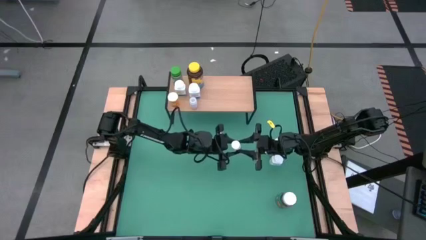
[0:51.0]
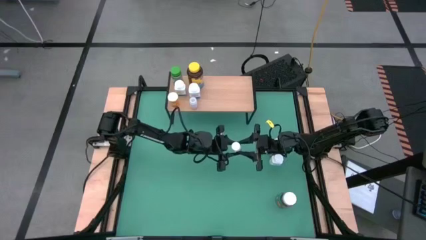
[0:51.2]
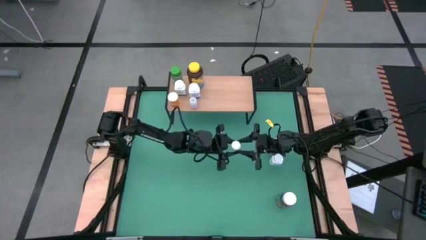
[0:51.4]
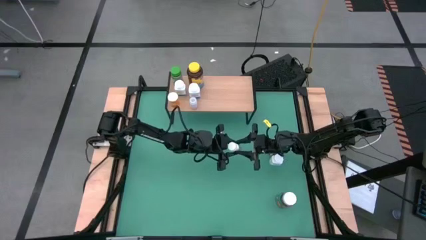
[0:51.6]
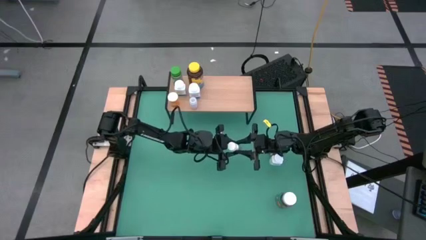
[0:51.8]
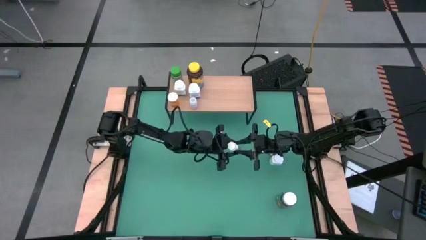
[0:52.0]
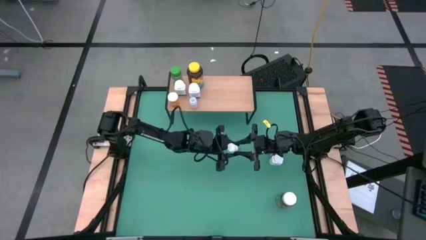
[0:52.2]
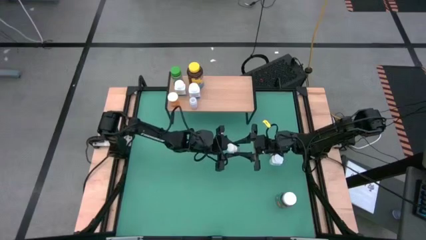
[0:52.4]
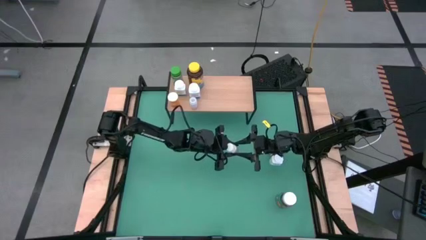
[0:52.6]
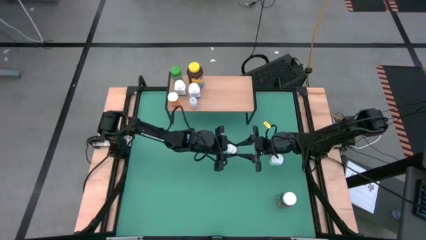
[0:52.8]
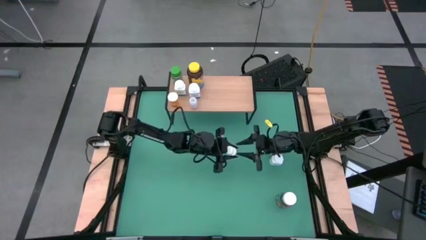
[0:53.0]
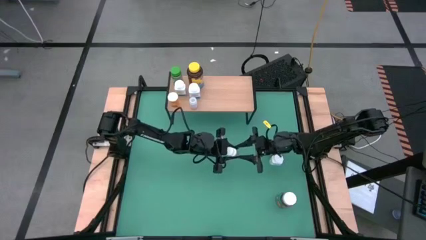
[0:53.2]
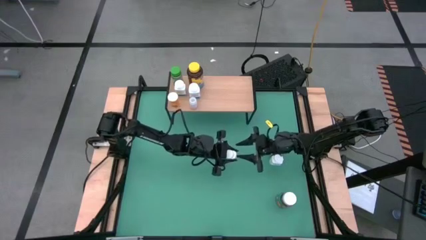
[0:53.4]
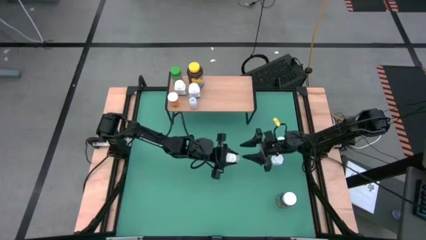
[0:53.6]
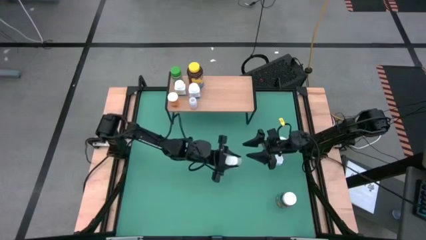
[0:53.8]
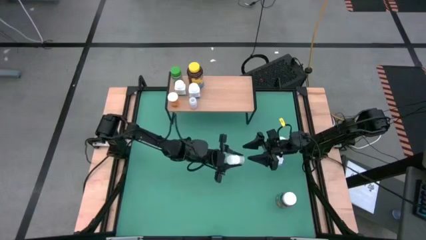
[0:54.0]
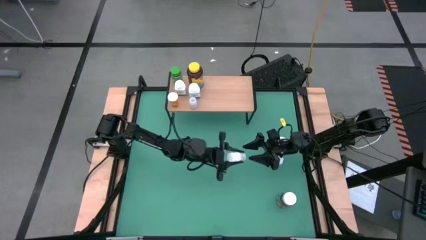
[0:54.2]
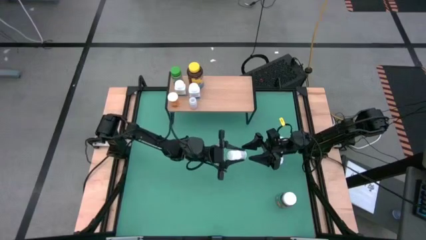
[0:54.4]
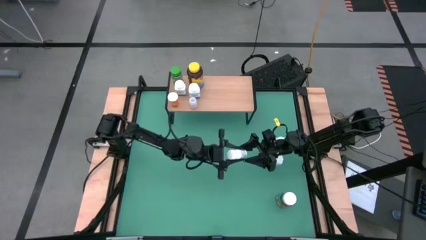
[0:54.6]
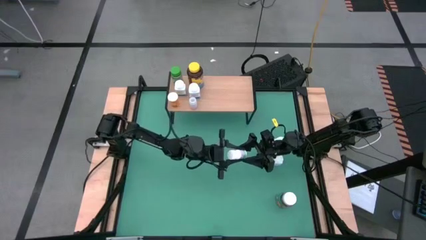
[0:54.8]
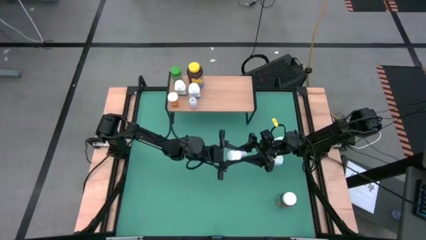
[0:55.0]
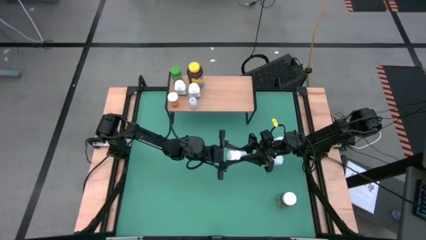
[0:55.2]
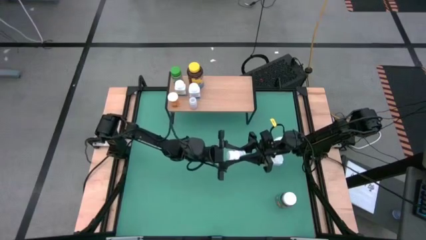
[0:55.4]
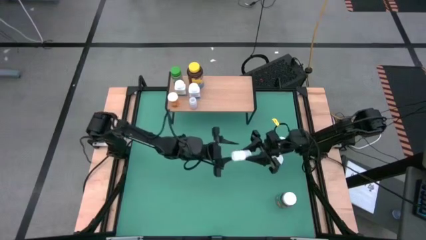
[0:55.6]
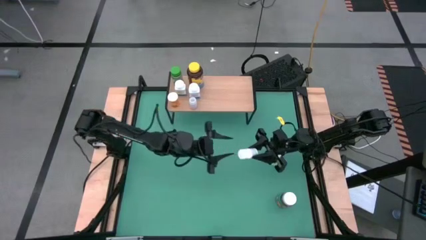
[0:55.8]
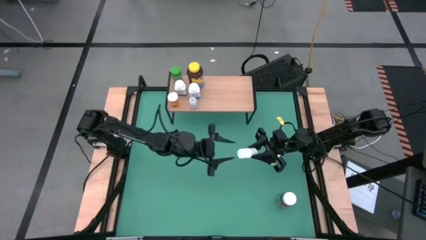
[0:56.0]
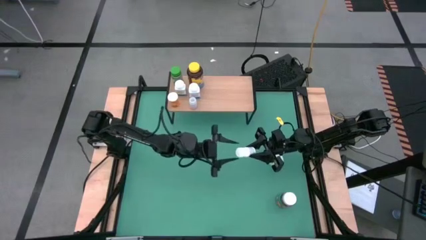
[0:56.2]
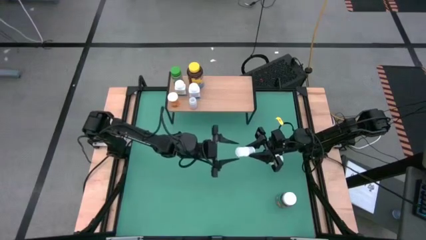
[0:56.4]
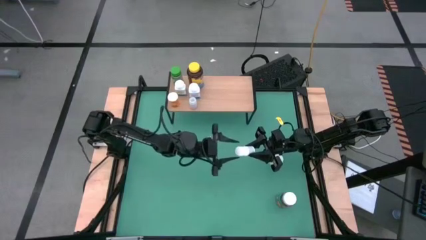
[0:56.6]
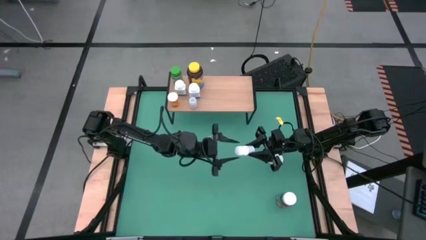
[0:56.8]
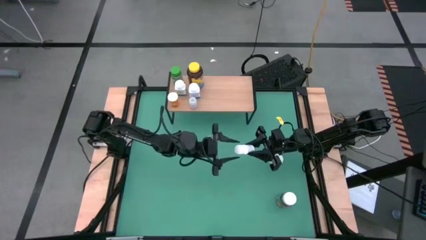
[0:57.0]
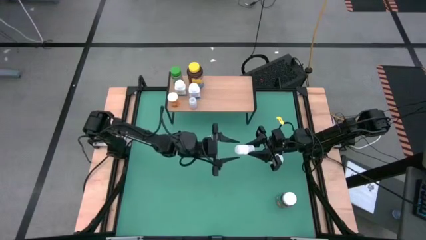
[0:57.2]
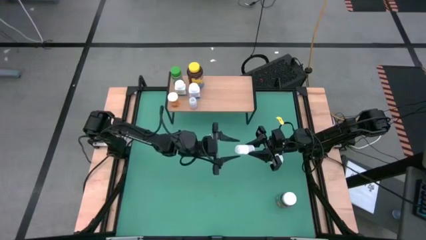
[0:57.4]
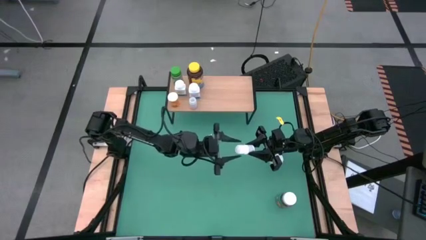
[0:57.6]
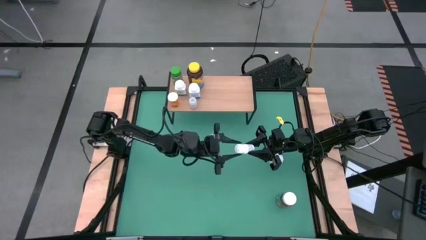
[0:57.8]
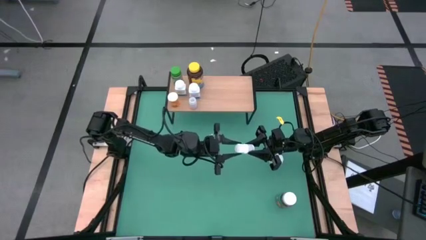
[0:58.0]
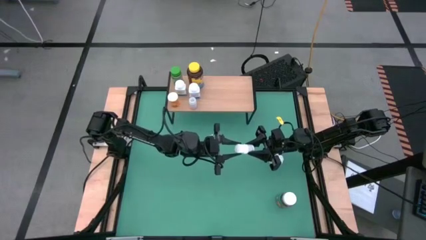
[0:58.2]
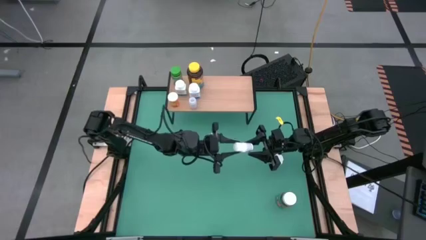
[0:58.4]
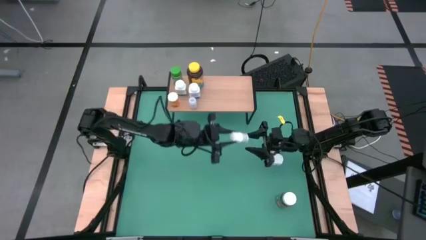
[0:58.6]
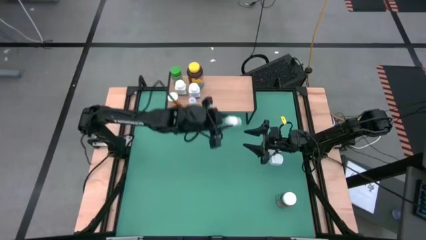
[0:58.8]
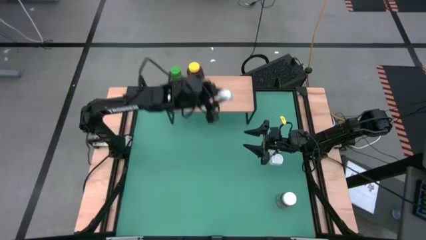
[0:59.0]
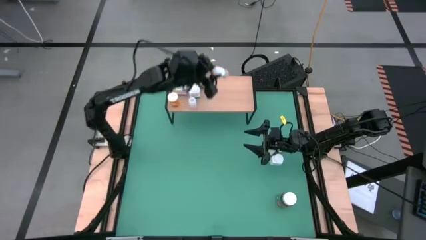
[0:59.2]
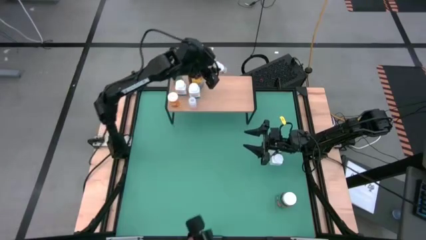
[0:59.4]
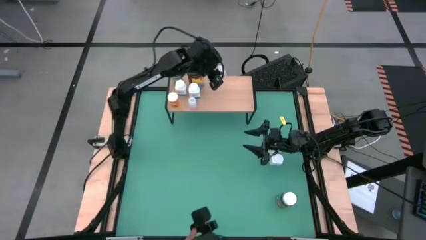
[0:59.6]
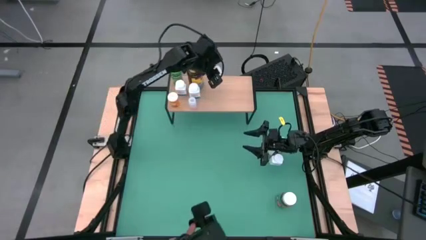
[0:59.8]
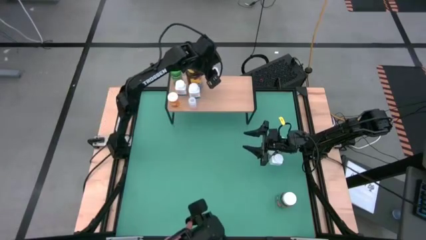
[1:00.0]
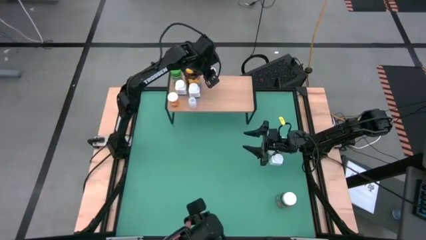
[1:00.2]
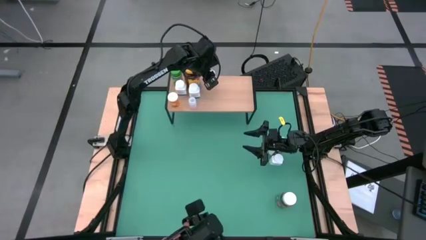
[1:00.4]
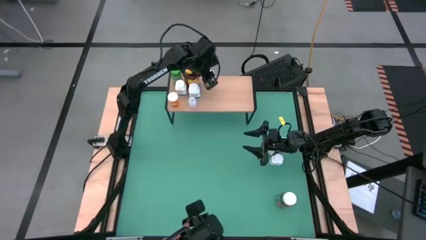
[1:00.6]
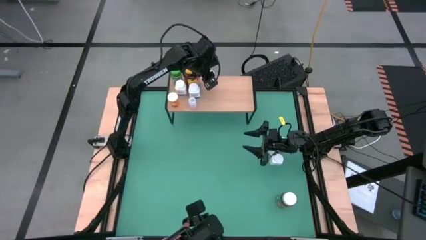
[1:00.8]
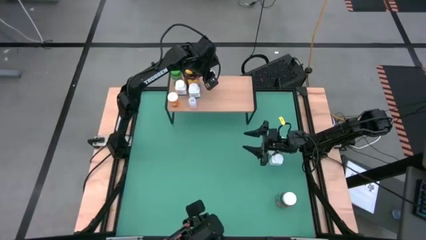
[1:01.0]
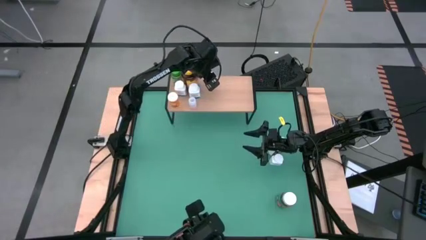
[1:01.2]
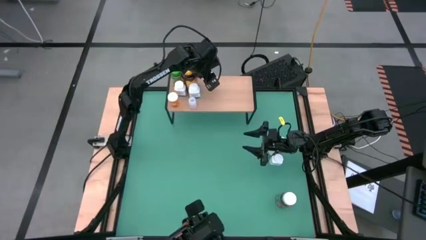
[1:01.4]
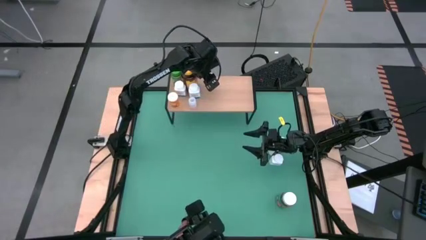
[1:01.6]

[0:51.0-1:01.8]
Task: Pick and place medicine bottles onto shelf by color
Put the small white pill bottle on the shelf

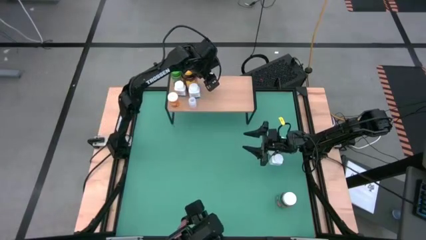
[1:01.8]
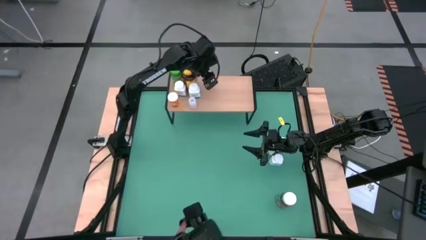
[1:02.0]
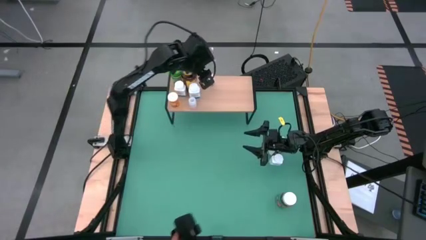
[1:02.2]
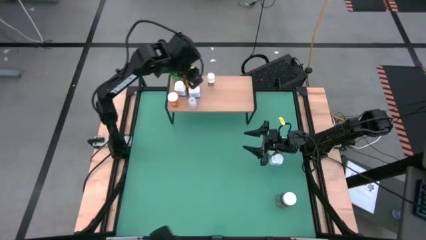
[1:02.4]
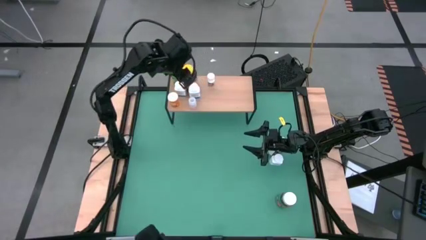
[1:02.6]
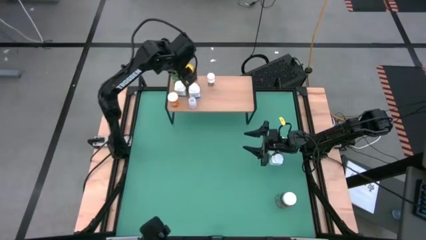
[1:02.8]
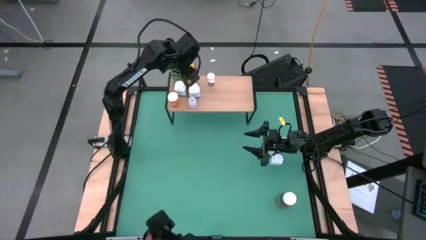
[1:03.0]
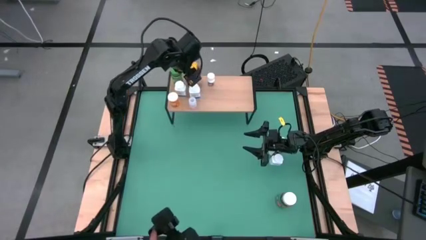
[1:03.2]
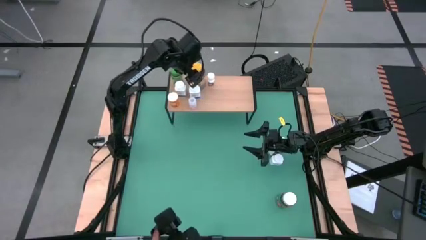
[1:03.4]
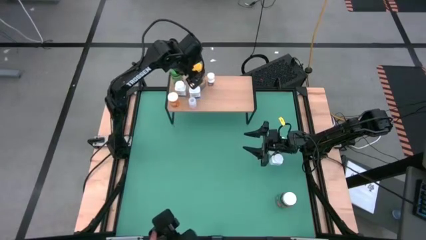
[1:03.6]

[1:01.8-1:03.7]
Adjust the yellow pill bottle

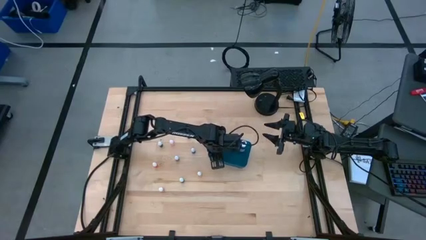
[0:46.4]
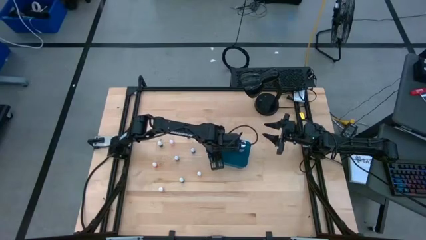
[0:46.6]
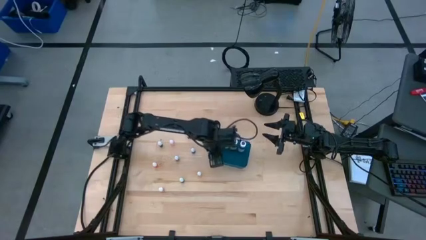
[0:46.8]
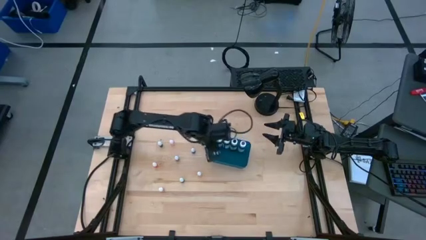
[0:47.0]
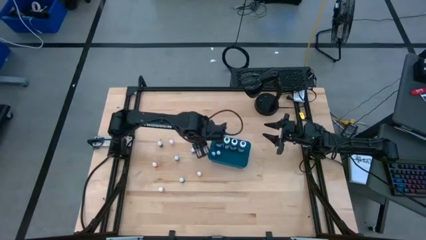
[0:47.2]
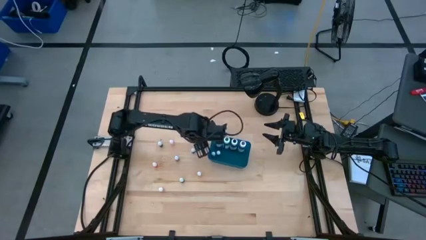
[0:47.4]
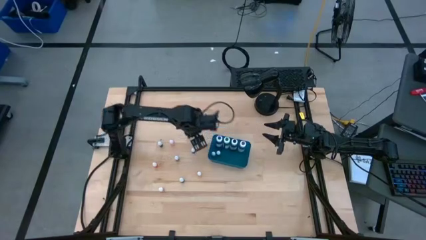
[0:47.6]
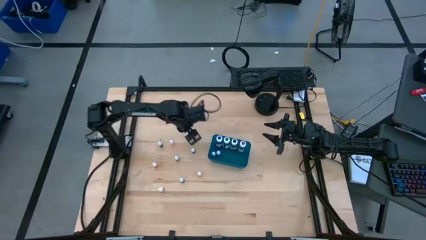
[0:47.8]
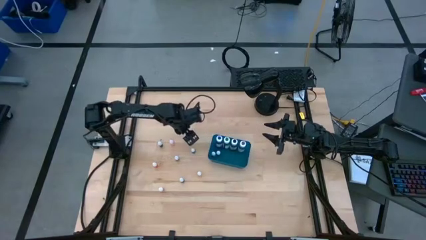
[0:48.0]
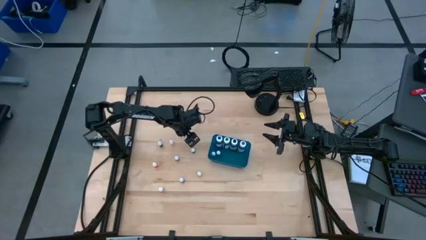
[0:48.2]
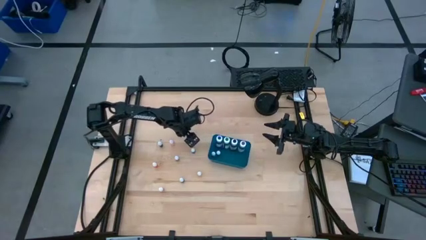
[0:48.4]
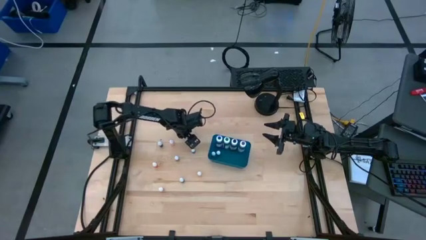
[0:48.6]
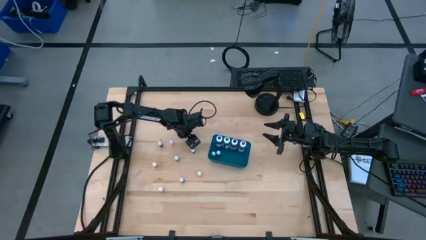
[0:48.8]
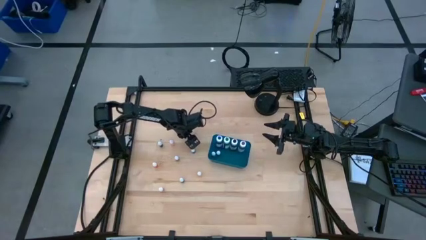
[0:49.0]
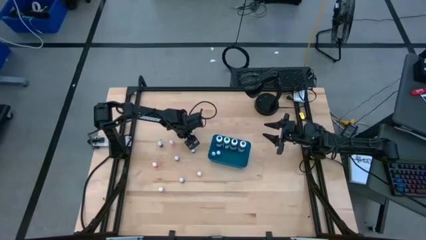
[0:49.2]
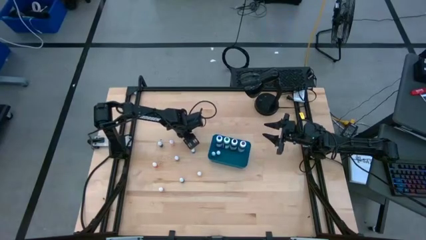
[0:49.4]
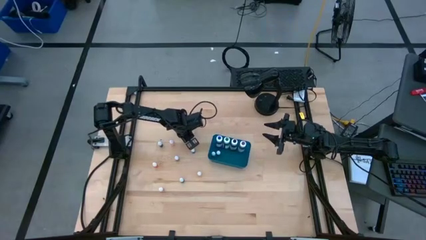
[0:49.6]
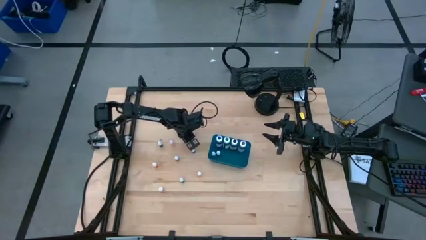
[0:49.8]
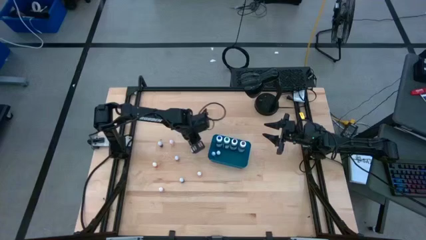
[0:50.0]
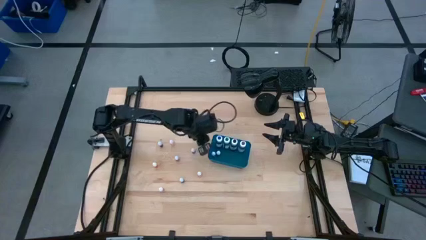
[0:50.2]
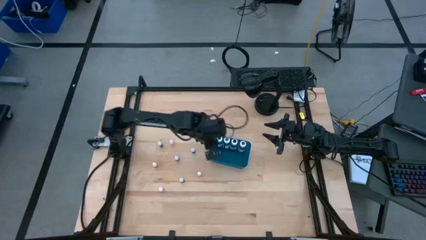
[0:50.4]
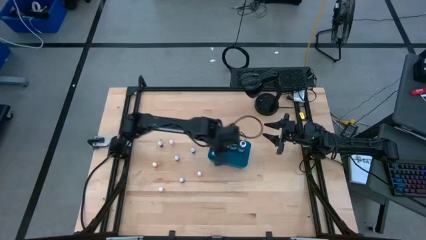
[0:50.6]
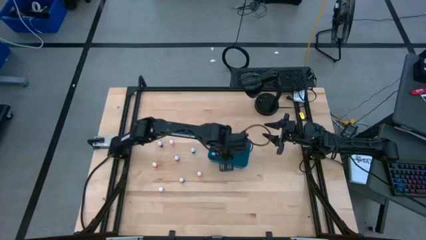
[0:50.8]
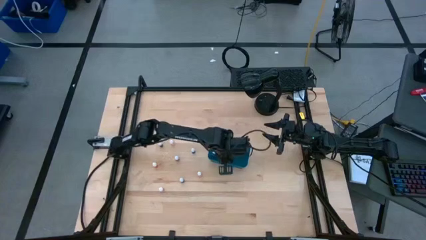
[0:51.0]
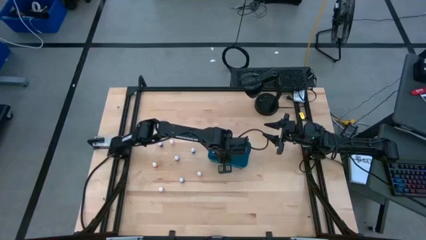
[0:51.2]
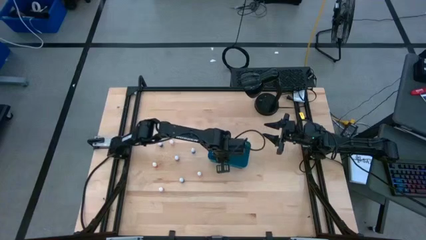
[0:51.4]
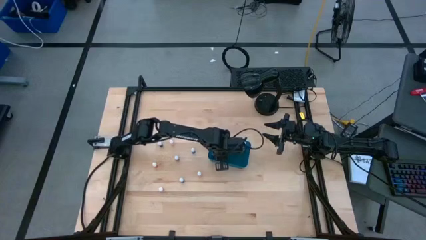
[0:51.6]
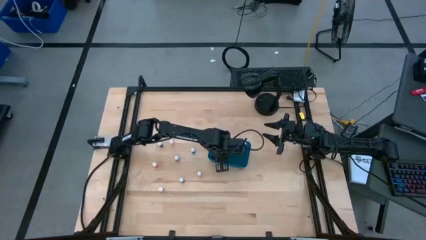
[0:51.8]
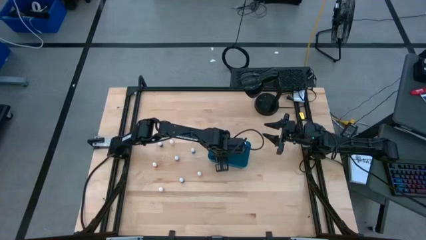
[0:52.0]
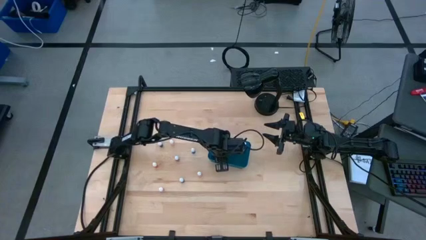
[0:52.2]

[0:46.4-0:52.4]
Task: Pick & Place food coloring
Put the small purple food coloring bottle into the blue container
